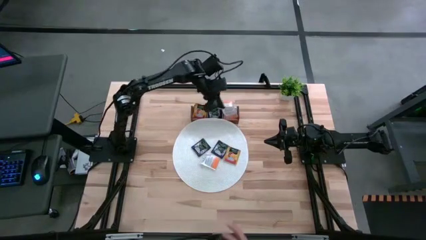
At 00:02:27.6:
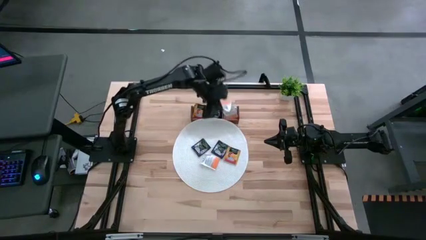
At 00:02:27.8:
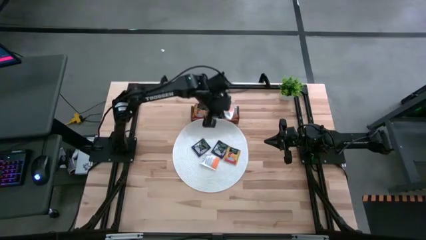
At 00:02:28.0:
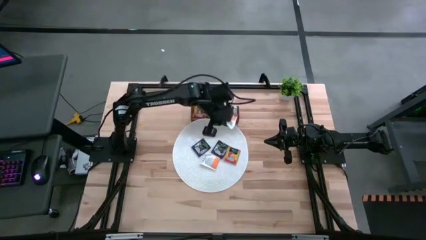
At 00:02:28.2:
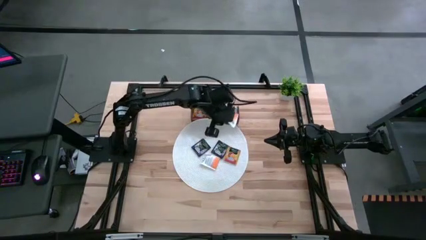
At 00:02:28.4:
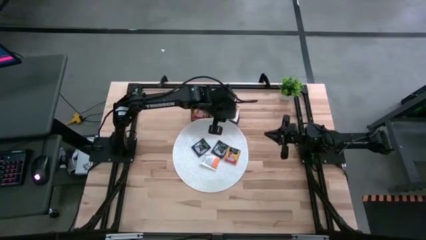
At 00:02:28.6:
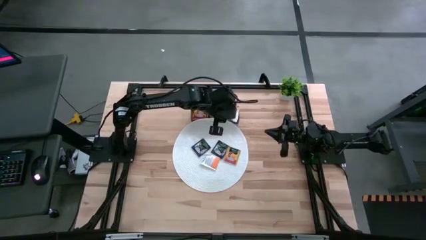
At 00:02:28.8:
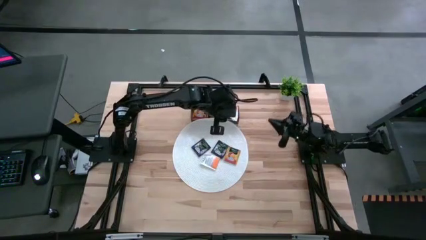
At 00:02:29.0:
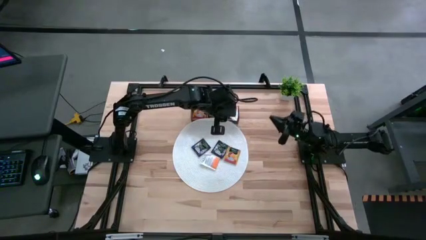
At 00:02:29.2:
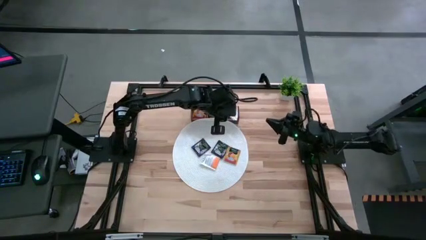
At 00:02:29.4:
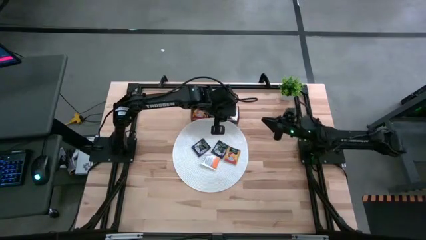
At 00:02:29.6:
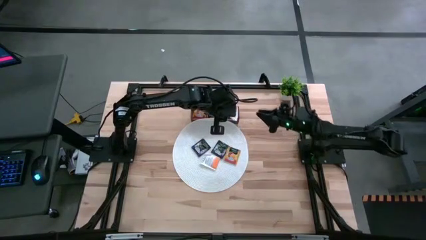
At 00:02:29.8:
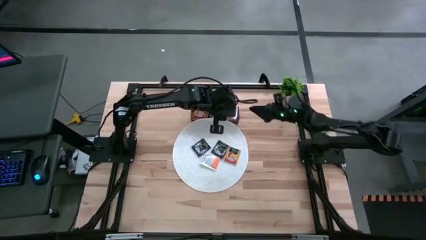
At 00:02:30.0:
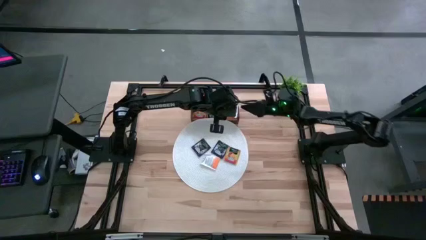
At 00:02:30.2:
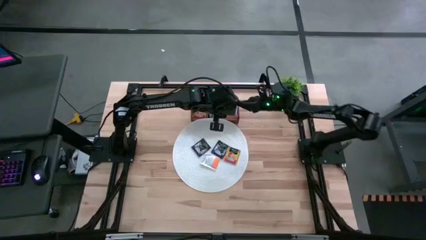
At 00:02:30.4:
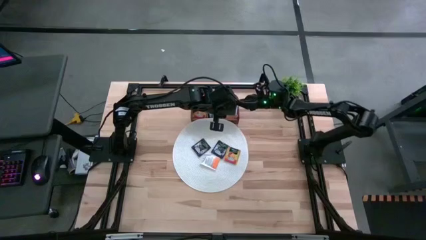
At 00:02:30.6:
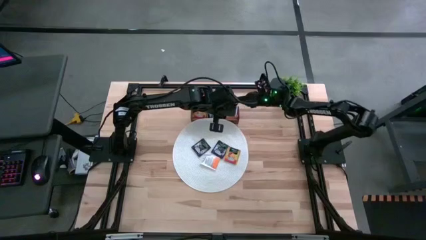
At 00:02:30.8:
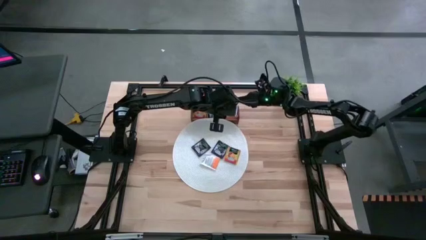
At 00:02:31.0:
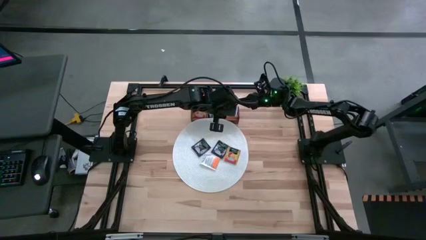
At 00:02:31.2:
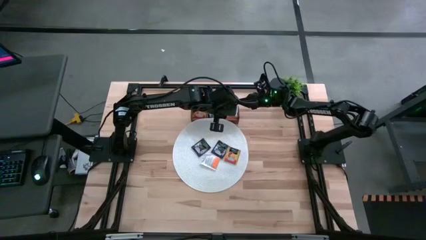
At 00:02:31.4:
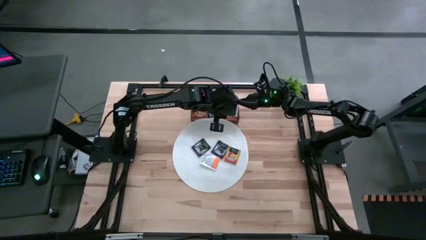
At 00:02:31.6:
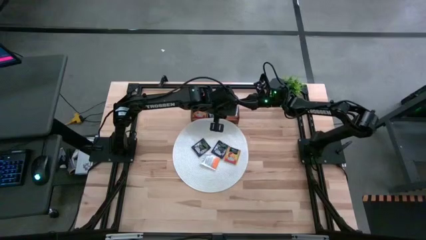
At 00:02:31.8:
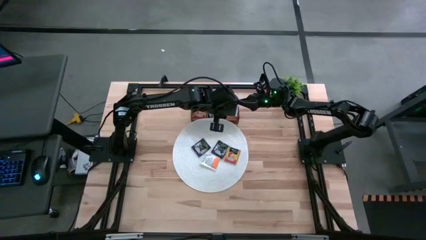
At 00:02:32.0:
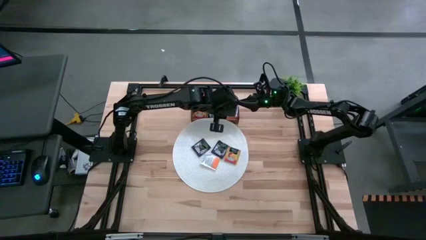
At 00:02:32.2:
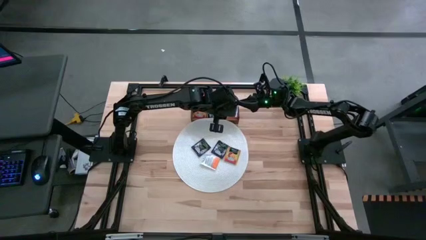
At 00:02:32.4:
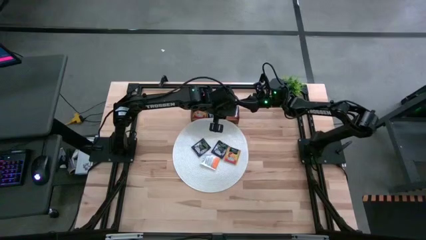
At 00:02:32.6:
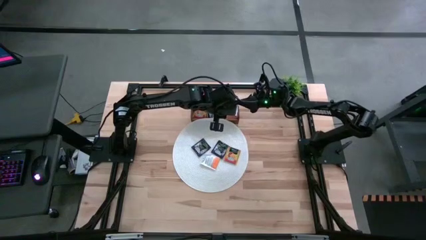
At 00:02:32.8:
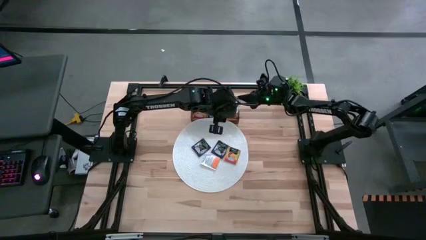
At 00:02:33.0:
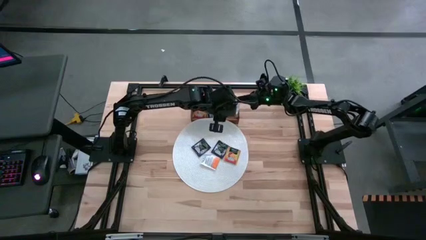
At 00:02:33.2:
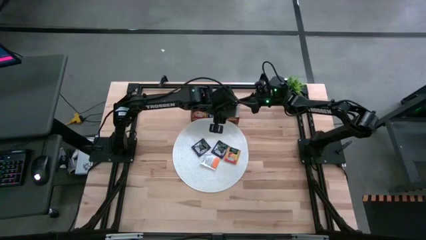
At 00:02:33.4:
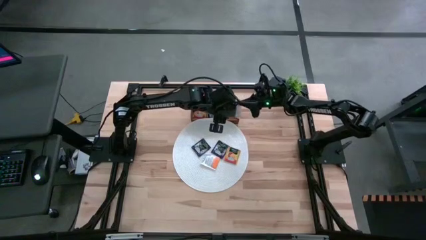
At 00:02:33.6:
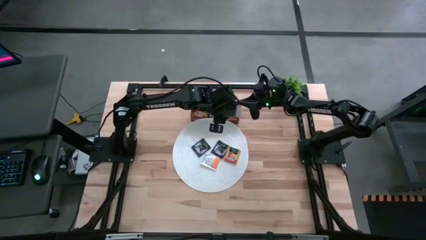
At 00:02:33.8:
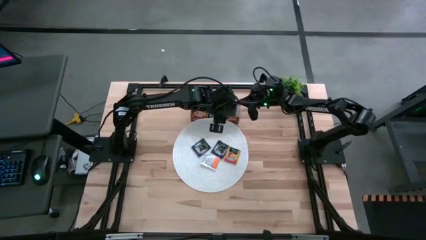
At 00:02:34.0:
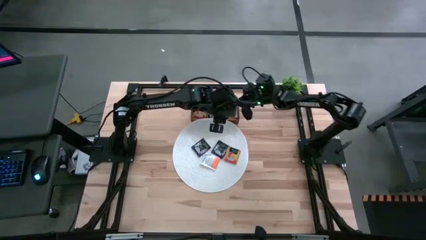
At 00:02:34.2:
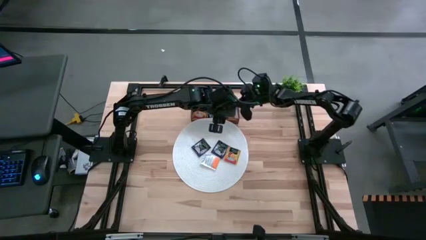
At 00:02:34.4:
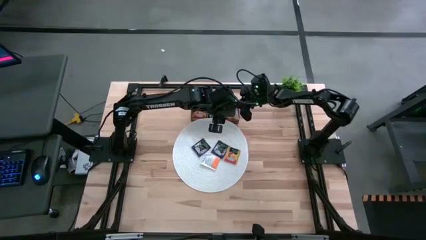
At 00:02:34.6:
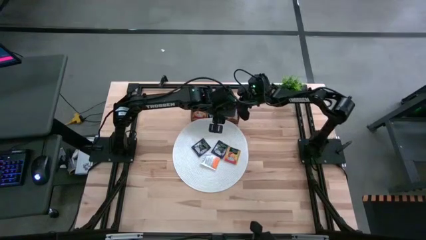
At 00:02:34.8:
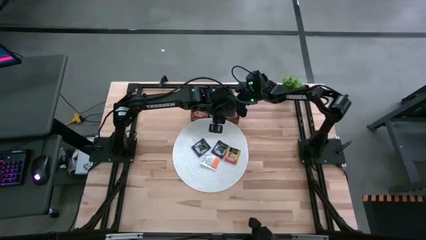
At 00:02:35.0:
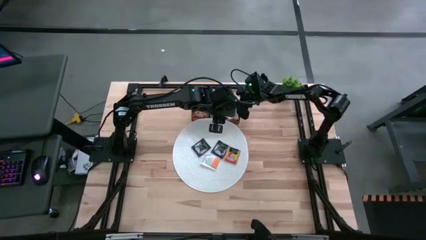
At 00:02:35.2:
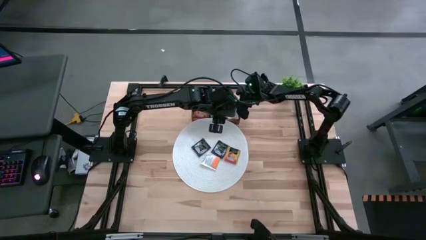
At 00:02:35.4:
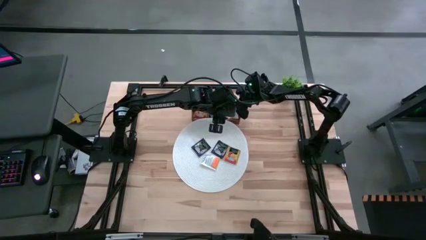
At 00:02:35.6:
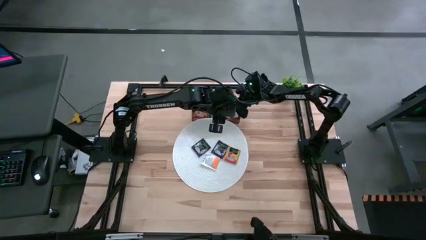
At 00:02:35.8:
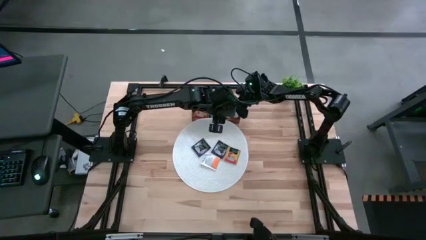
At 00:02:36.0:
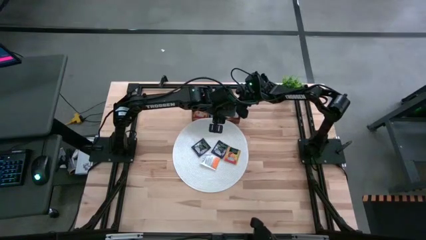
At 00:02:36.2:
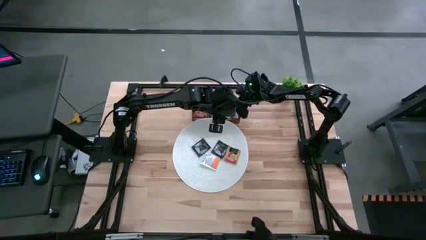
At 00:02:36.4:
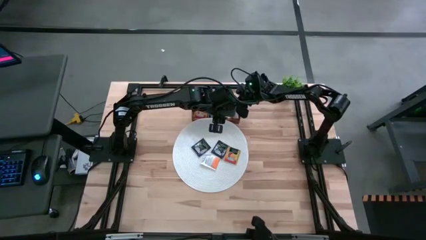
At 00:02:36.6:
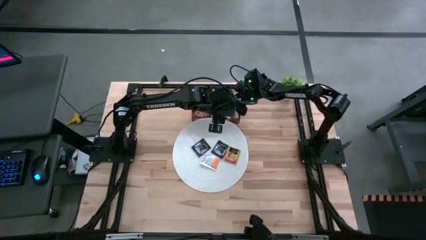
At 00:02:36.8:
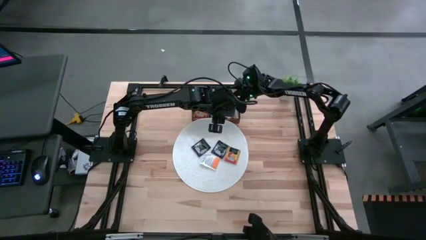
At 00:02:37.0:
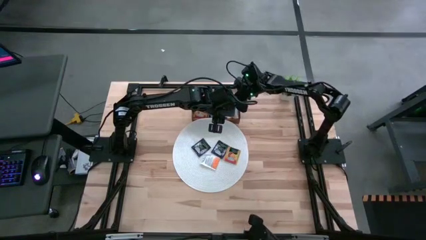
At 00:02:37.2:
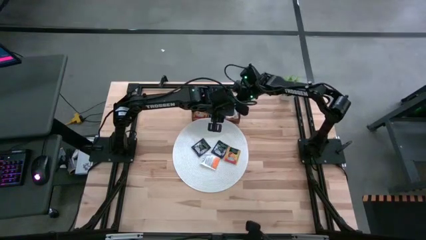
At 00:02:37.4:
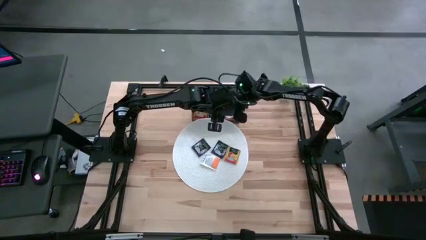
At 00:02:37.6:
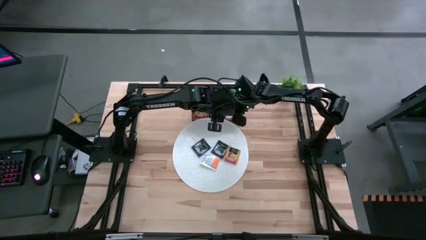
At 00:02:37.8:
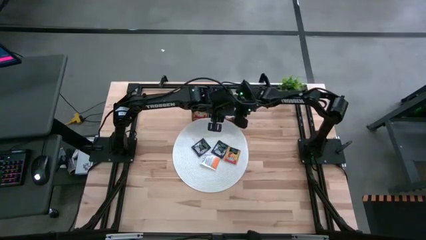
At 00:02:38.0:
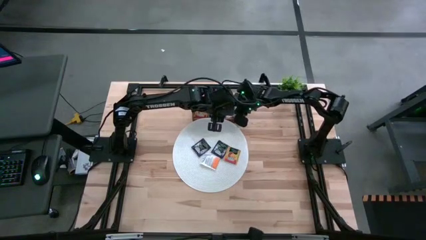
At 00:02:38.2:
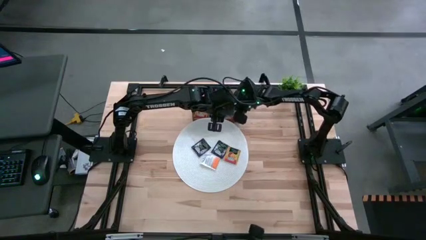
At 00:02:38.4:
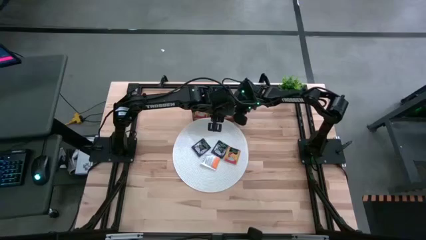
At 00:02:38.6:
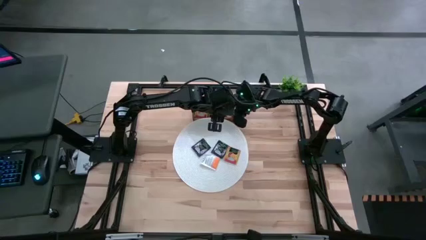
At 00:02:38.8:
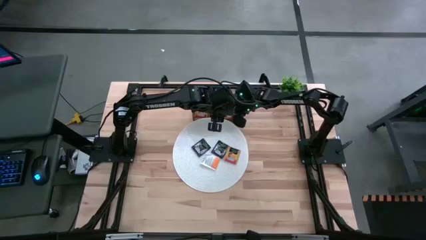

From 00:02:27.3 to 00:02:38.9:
Task: Pick & Place Tea
Put the white tea bag into the right section of the wooden organizer
